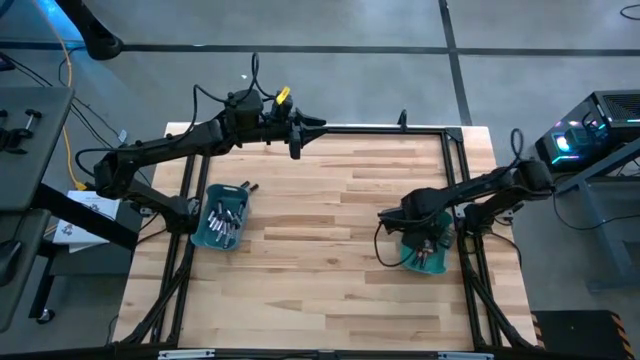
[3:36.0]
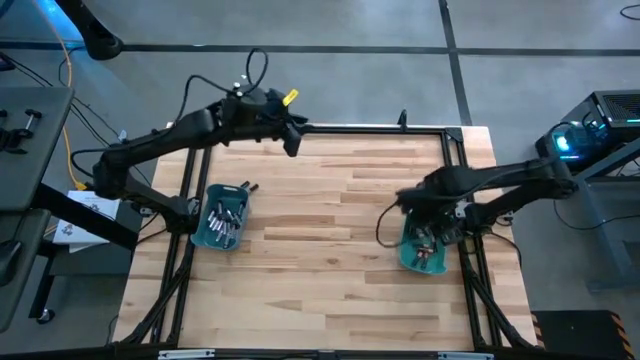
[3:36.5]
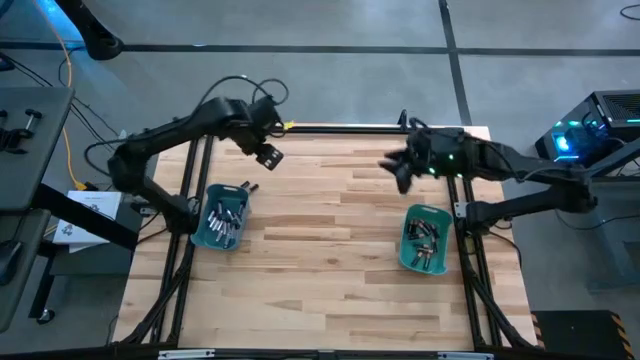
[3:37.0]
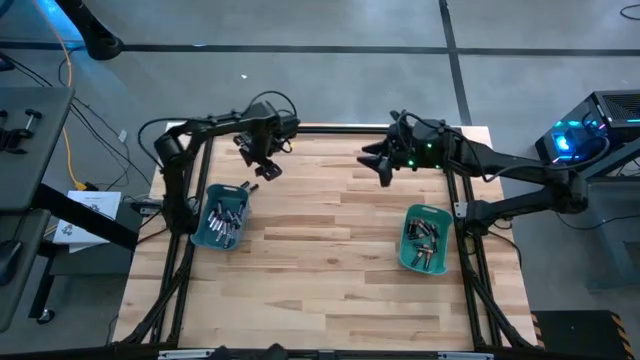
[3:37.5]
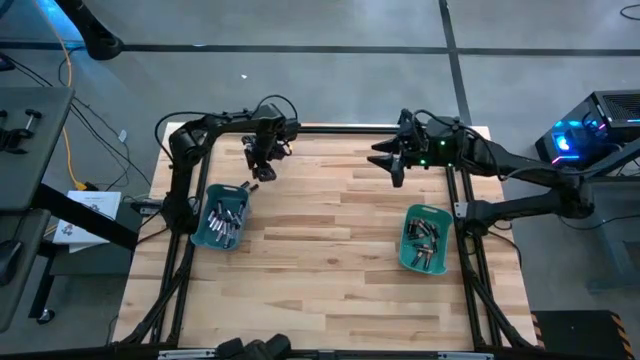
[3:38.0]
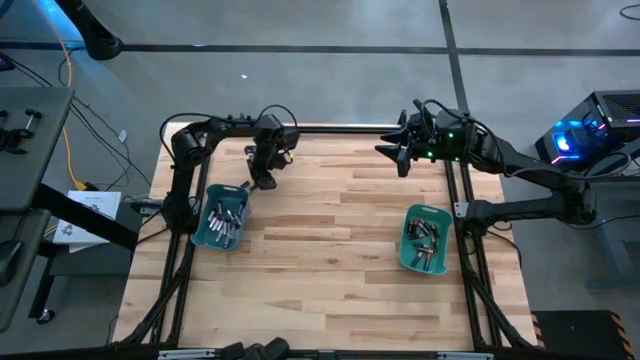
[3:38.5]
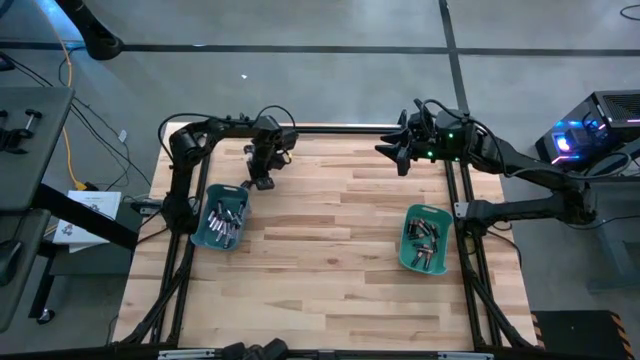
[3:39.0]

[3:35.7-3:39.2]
Task: Sort batteries
Put the black battery into the green bin

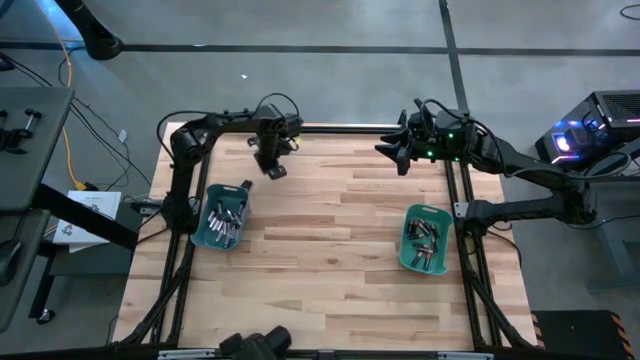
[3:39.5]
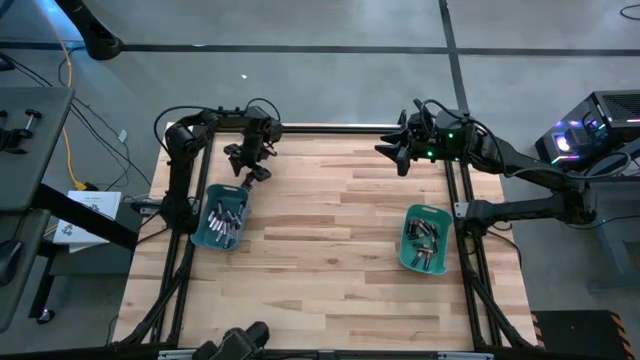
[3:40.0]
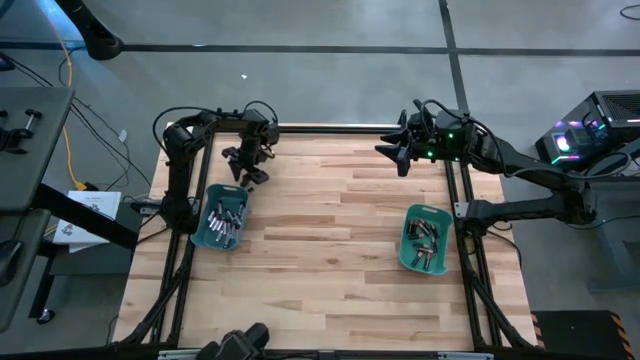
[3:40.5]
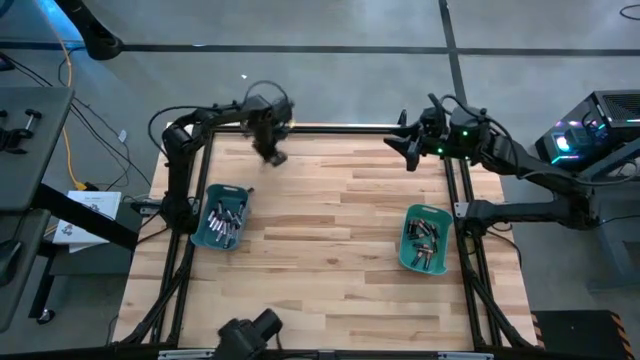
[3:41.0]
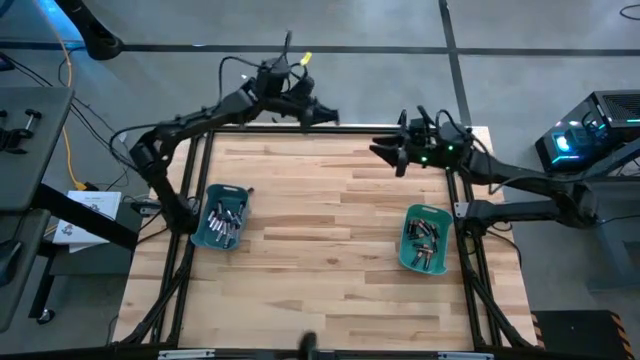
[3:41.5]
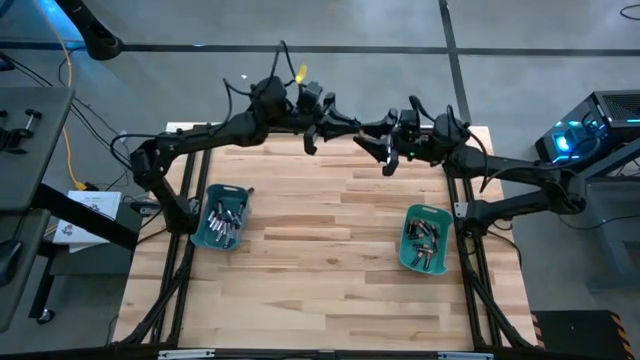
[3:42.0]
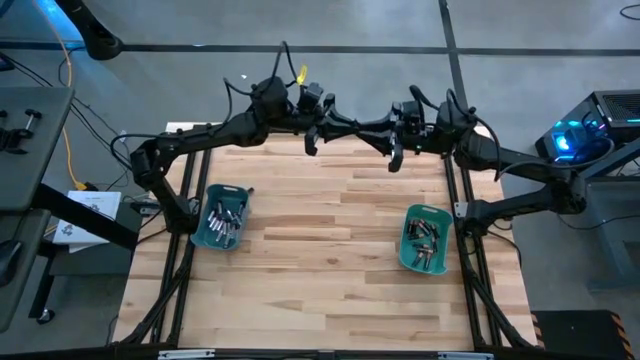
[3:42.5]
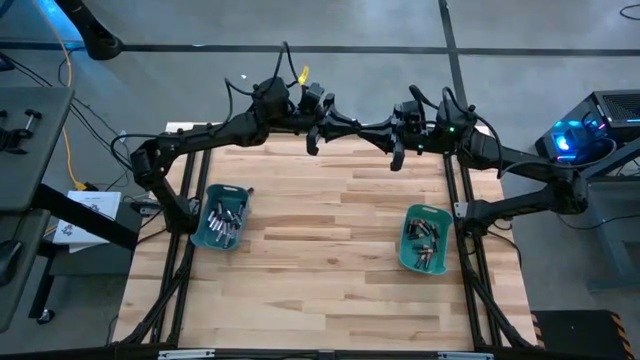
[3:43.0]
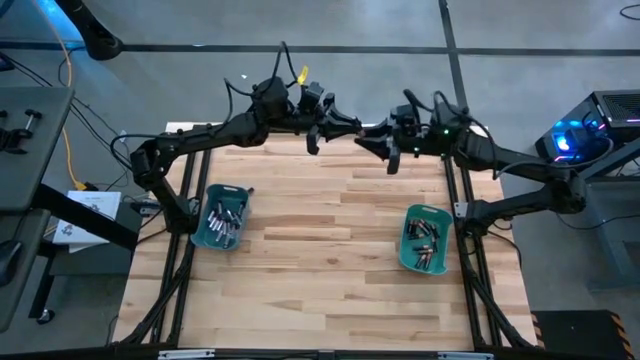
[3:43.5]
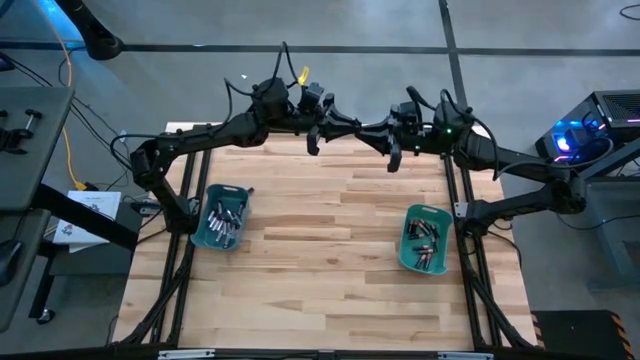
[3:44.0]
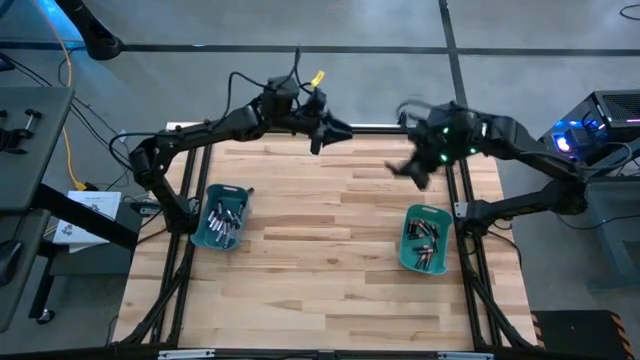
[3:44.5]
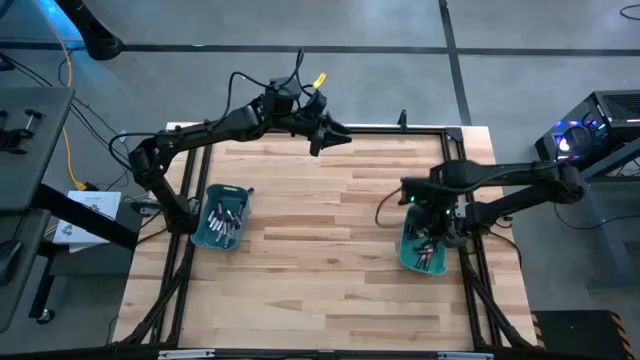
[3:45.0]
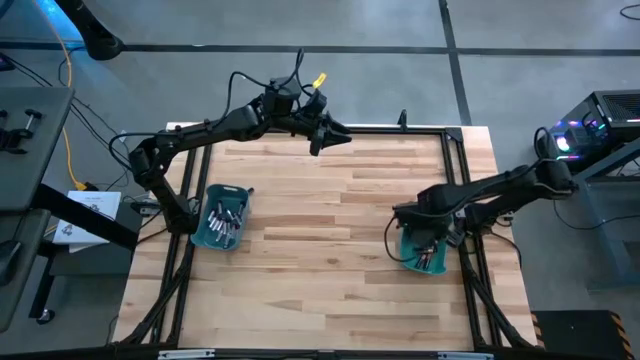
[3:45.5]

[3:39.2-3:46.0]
Put the black battery into the green bin

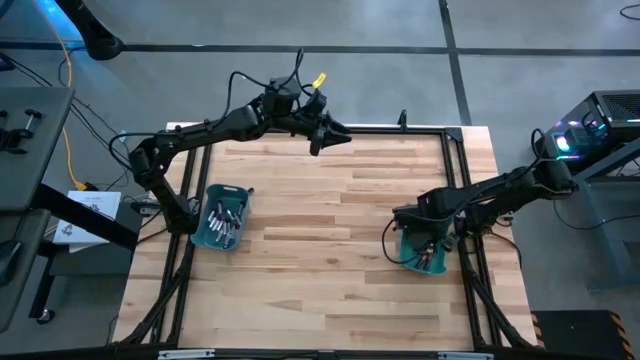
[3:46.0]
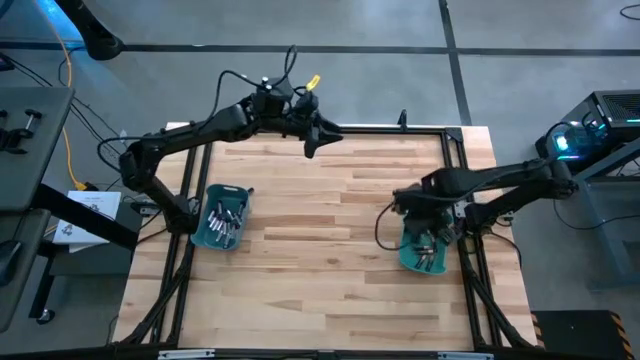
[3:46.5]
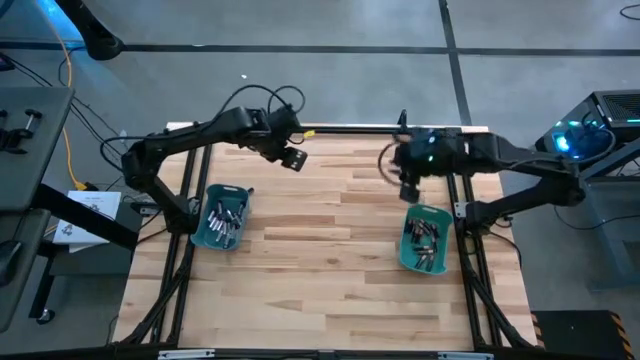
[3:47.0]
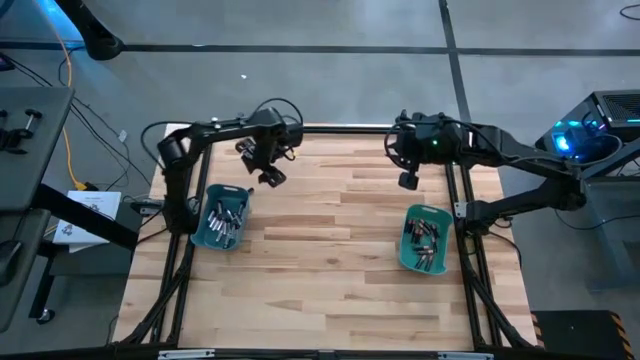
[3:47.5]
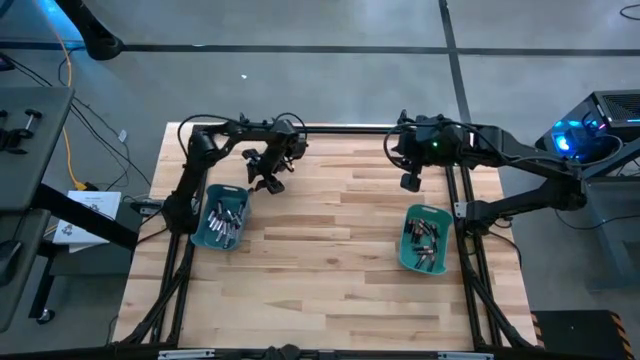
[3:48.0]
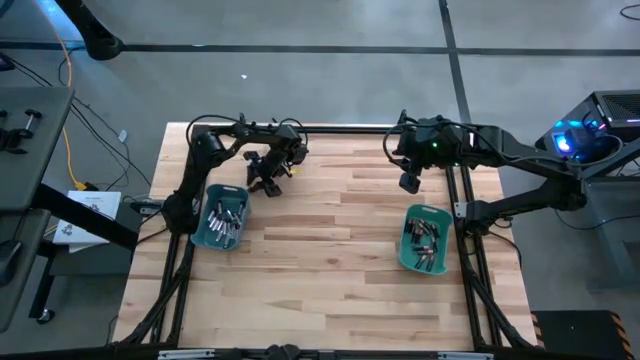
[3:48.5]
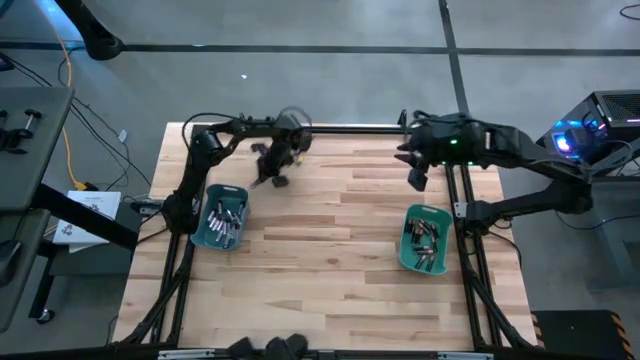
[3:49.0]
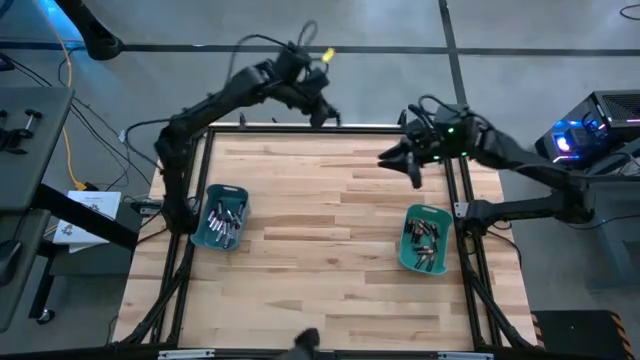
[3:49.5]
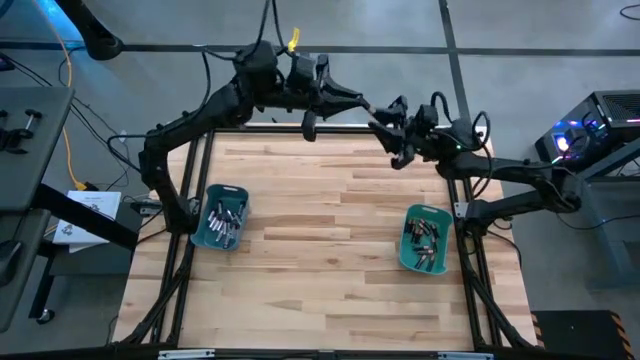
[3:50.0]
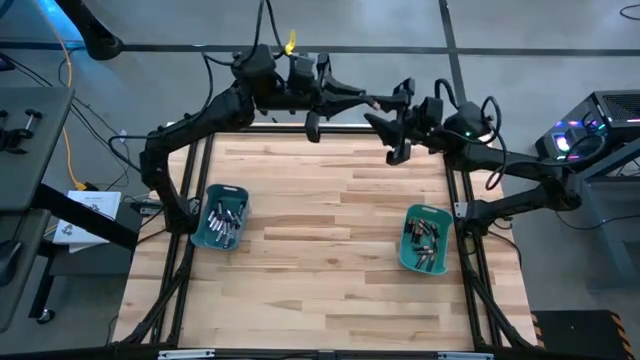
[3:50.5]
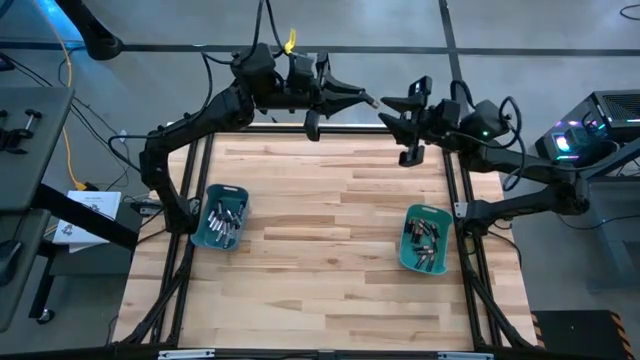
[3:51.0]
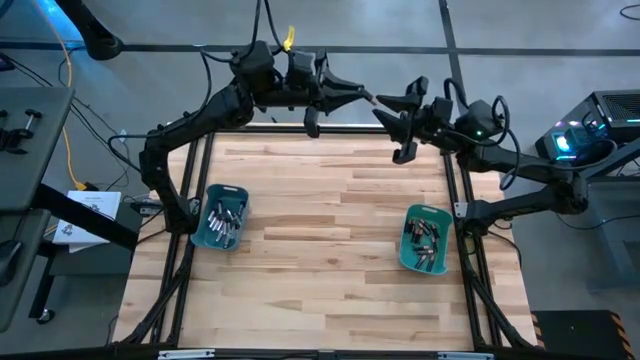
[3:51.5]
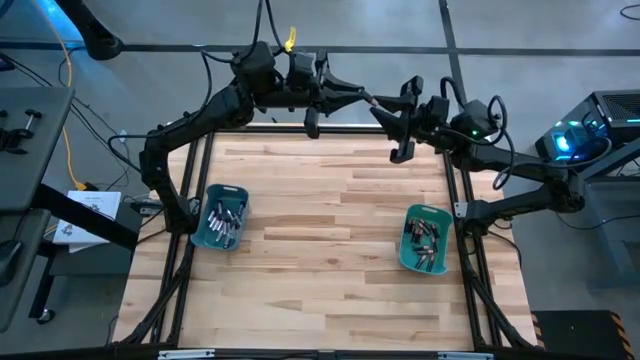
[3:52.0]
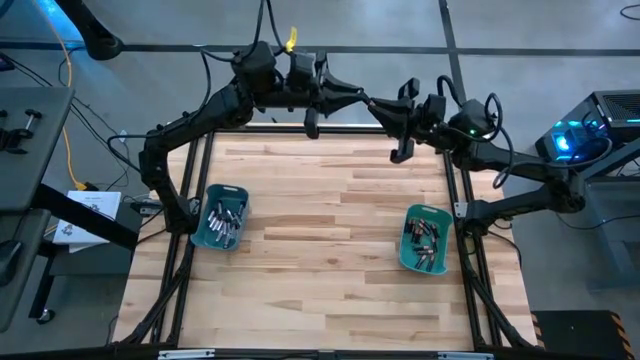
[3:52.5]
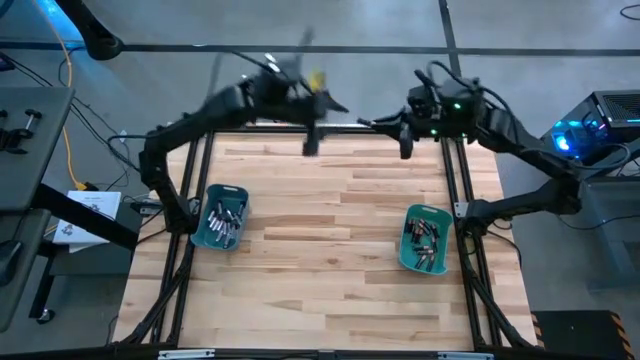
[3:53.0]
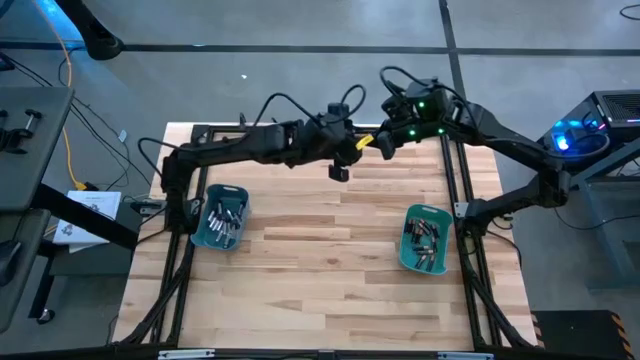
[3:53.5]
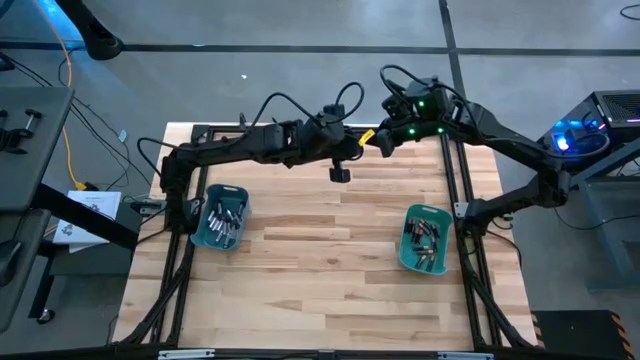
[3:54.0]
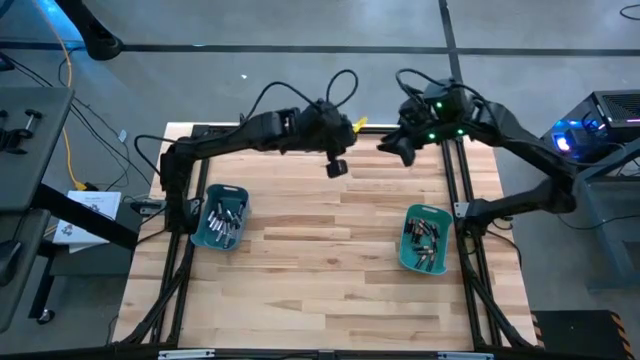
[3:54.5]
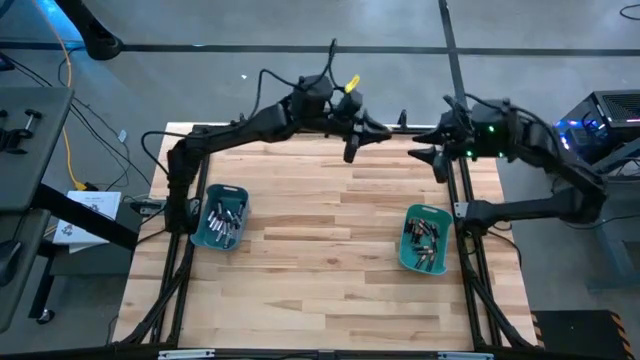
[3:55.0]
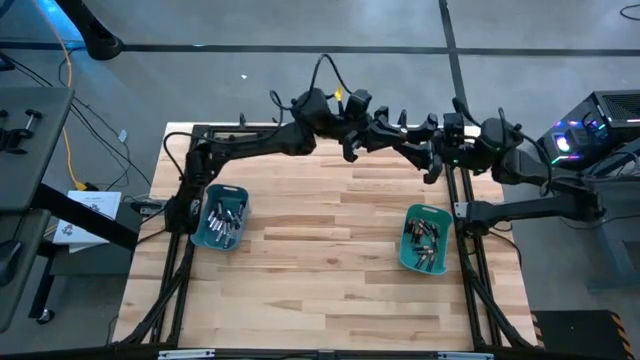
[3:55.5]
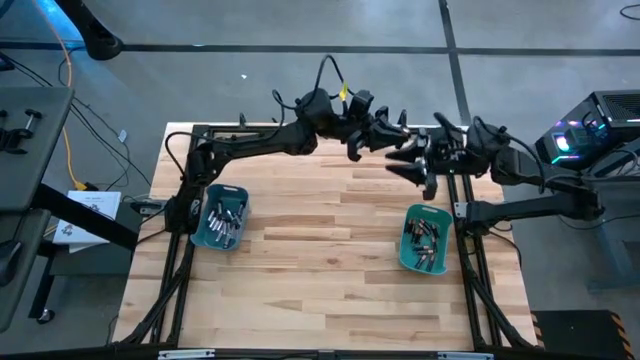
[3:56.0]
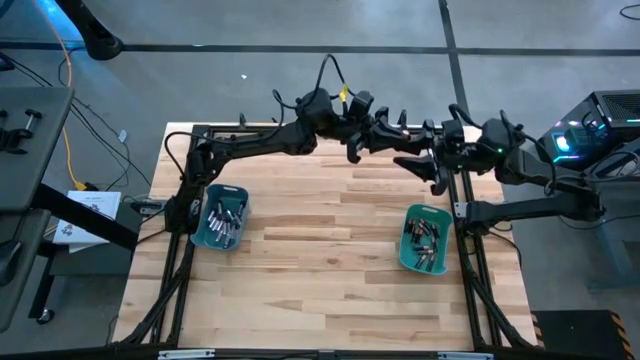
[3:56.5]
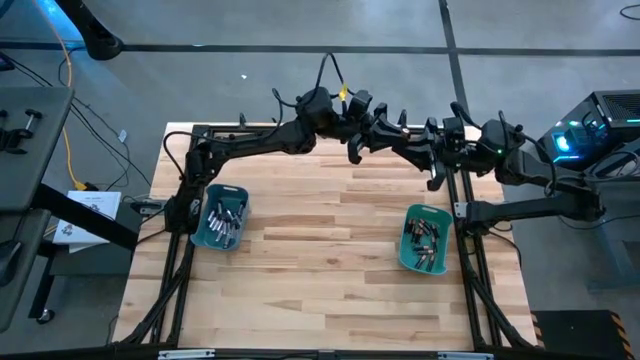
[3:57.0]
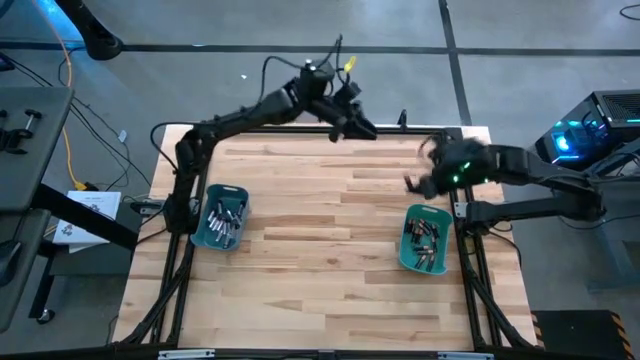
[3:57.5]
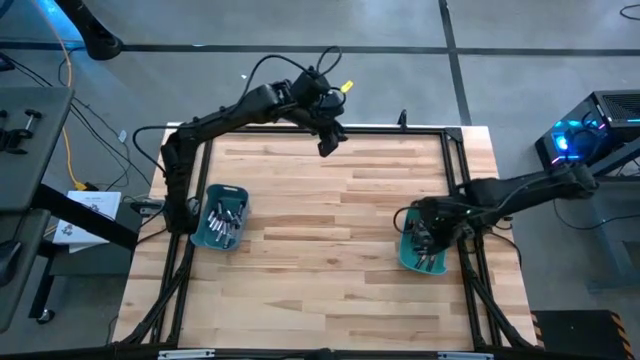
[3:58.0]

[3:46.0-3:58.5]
Put the black battery into the green bin
